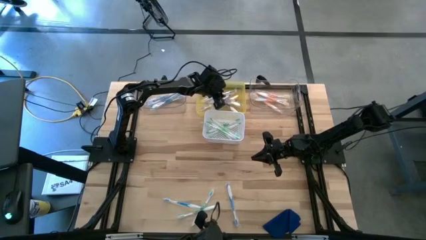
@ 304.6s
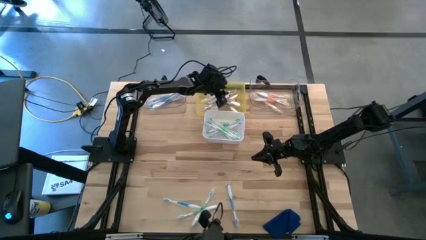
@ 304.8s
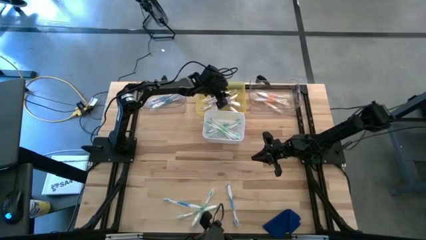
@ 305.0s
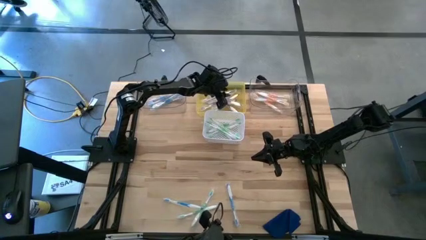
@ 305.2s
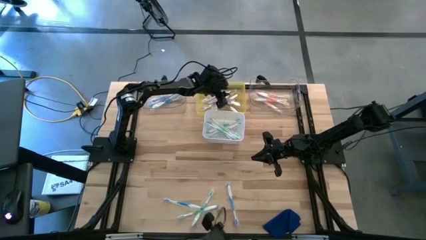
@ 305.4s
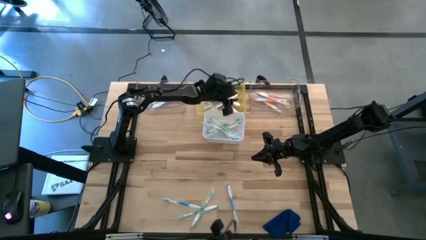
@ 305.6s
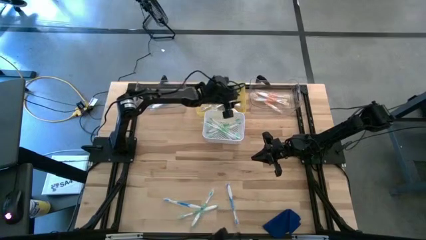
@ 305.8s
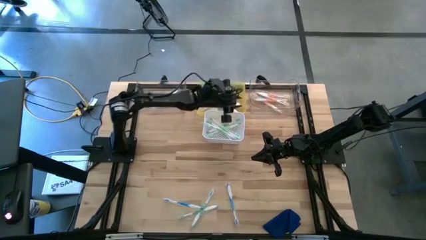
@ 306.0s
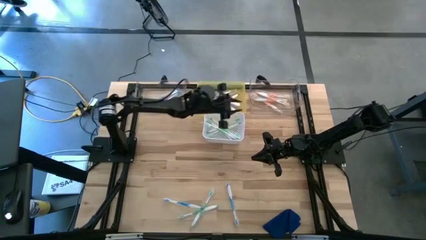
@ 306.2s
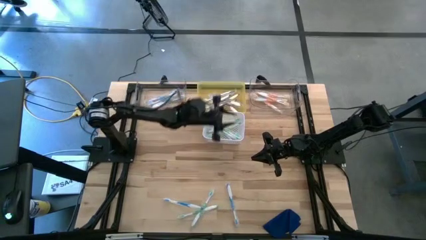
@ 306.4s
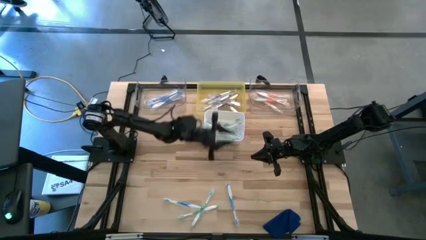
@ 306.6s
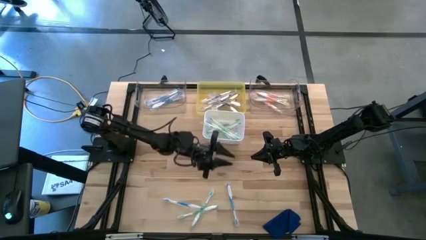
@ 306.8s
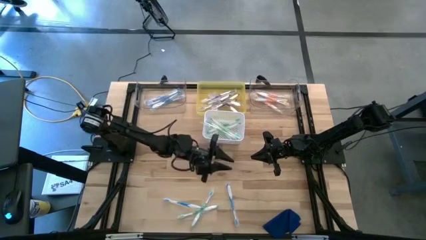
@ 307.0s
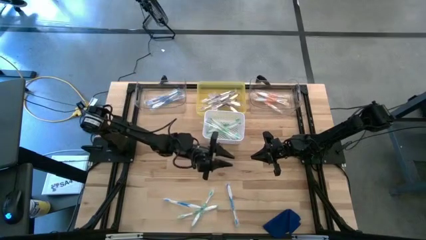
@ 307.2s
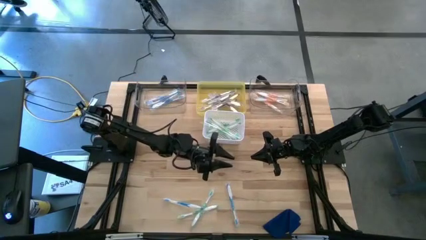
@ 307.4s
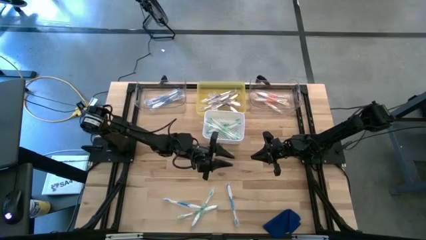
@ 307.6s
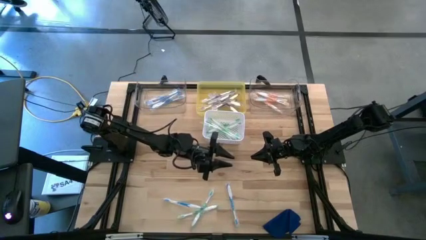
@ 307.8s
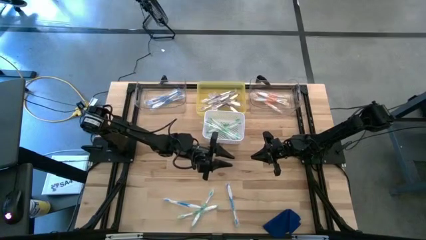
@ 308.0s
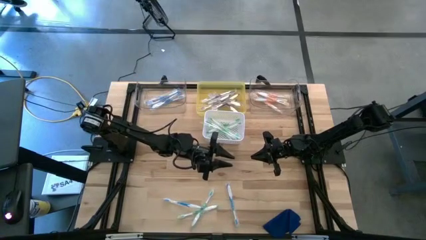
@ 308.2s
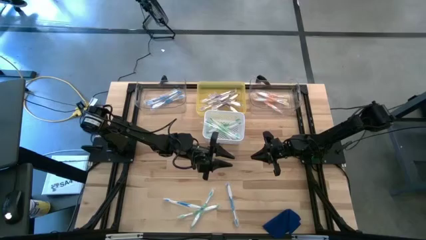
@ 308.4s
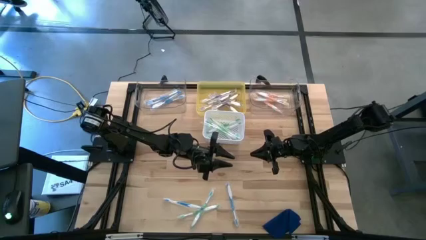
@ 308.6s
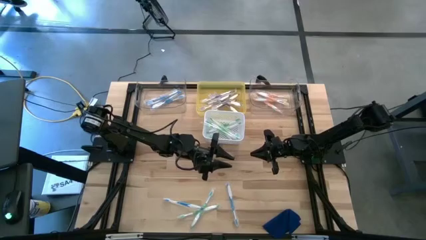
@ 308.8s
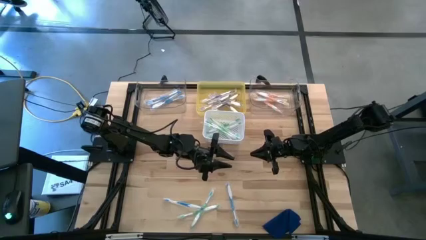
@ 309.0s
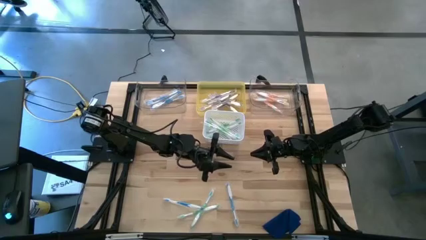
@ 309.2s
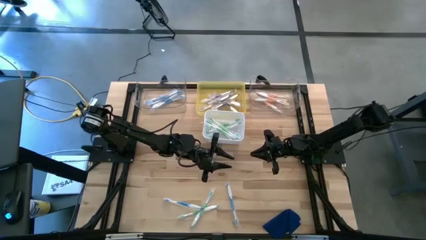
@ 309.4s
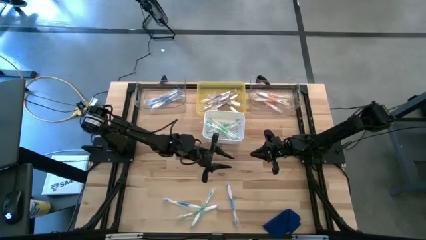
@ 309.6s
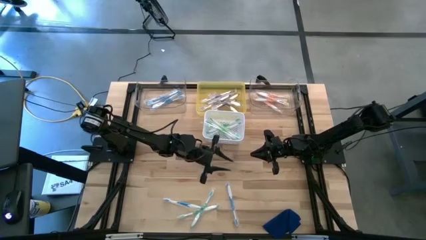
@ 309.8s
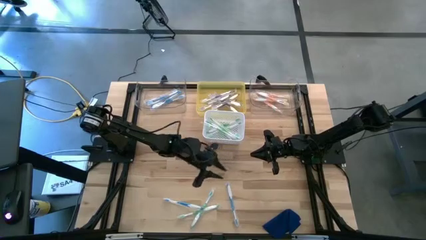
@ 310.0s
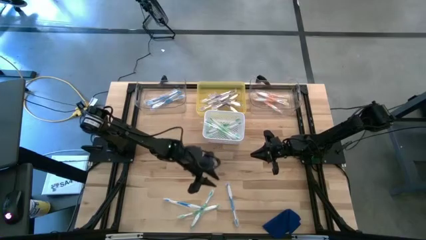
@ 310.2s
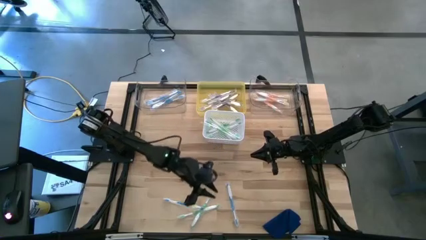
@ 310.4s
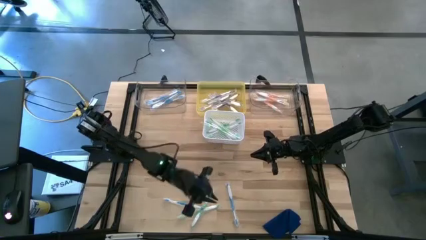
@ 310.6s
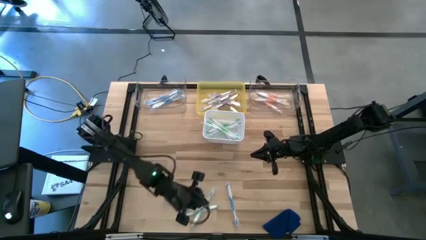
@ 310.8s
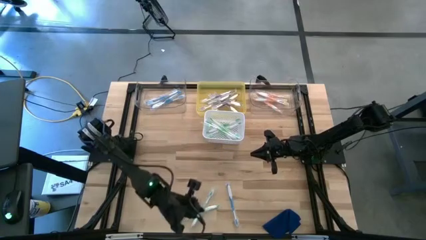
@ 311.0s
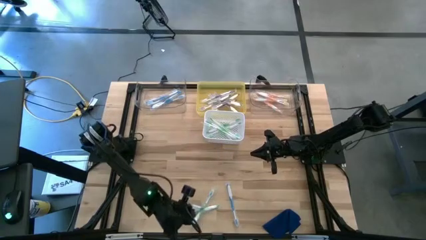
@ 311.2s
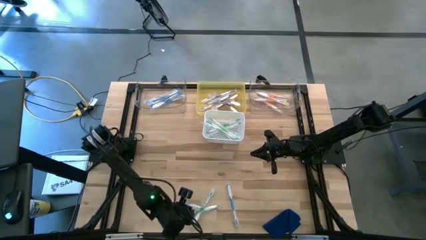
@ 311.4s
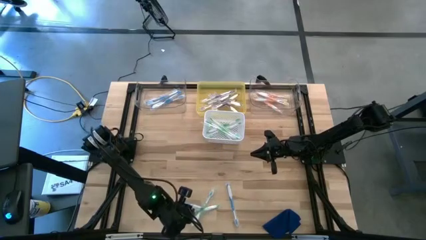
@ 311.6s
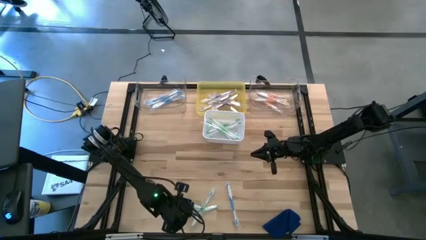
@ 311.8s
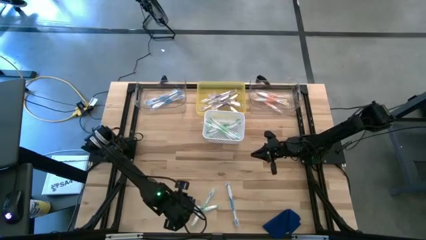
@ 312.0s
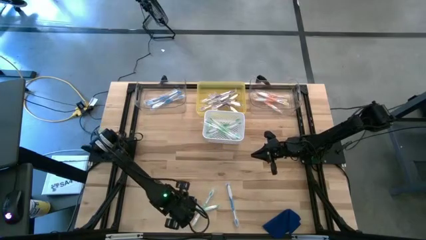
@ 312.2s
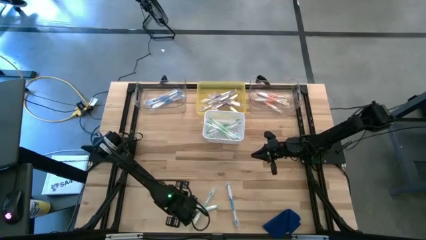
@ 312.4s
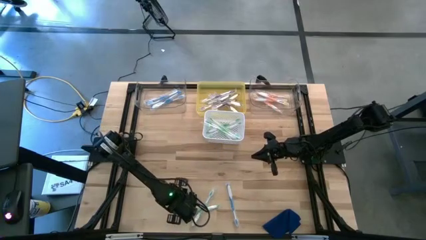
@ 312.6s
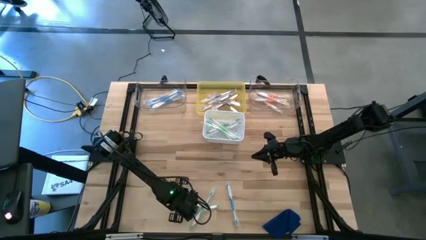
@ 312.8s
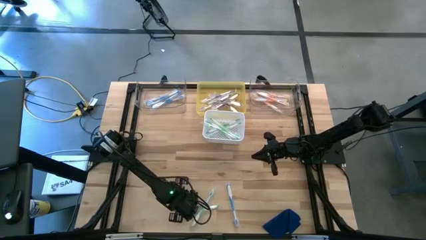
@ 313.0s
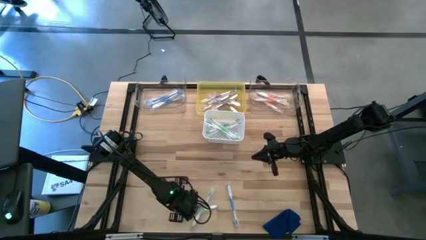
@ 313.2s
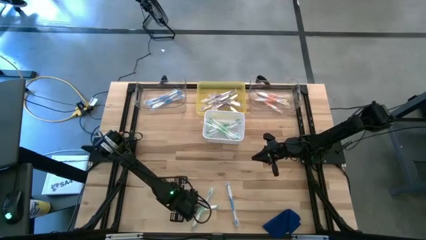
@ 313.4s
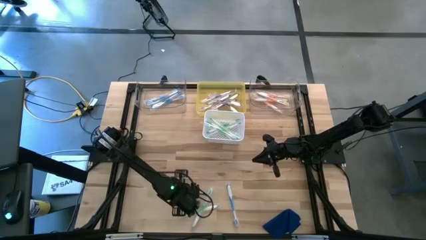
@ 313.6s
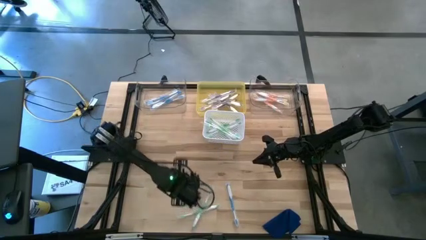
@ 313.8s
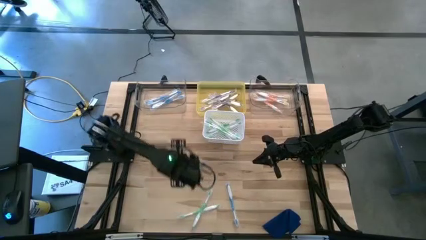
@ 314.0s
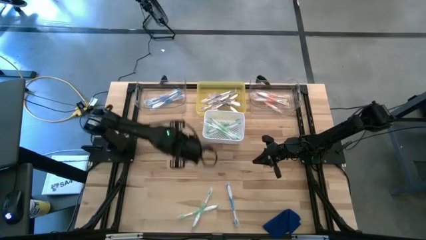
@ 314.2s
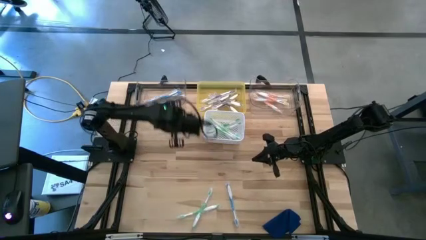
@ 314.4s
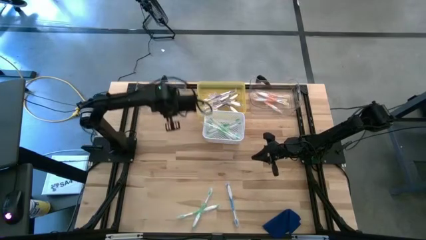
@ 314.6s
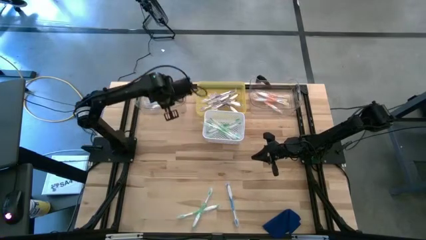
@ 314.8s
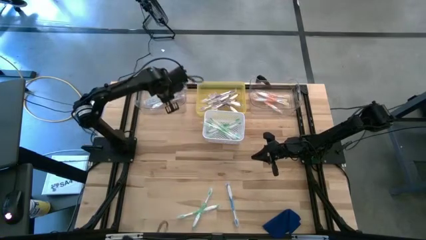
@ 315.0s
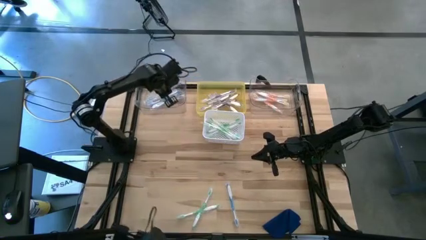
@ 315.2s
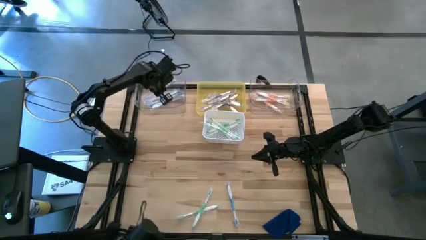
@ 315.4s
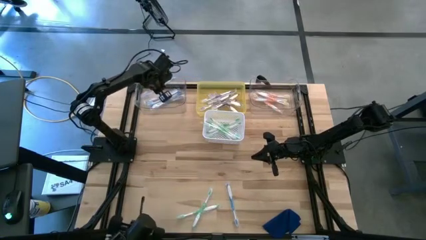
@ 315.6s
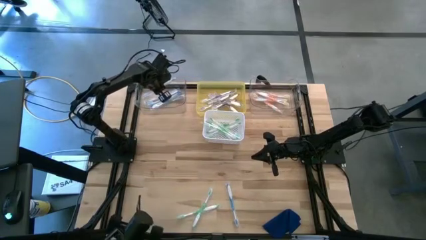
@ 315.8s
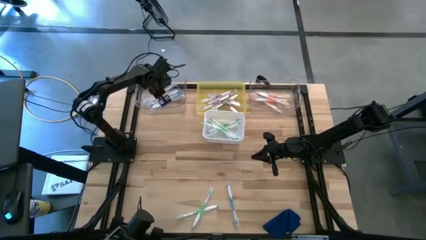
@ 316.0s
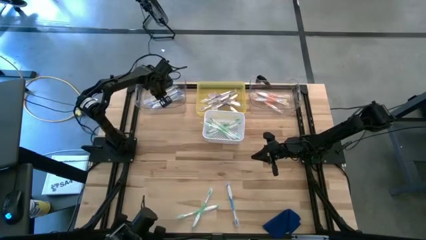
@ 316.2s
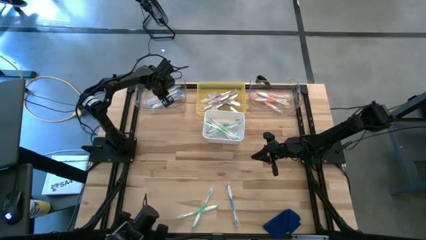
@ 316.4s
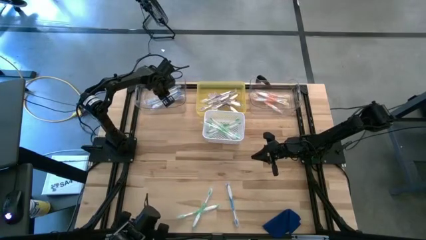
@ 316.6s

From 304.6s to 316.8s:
Task: Pick & Place Toothbrushes
Put the blue toothbrush into the left transparent bin

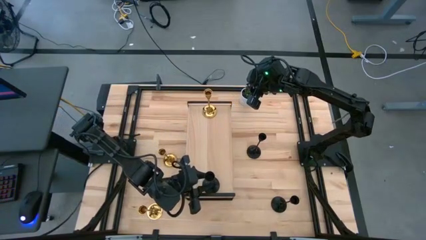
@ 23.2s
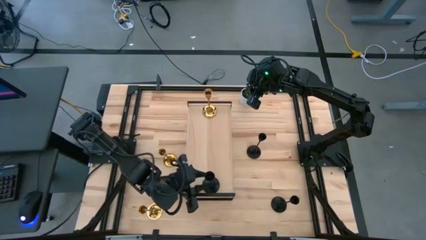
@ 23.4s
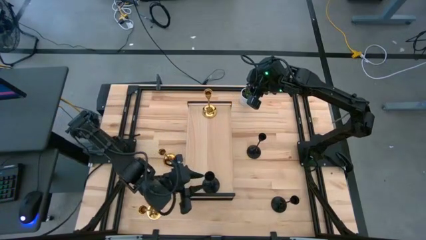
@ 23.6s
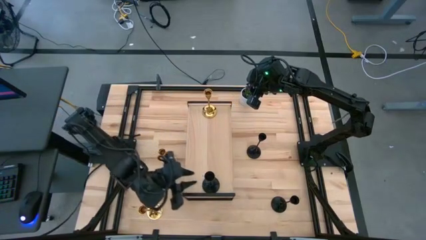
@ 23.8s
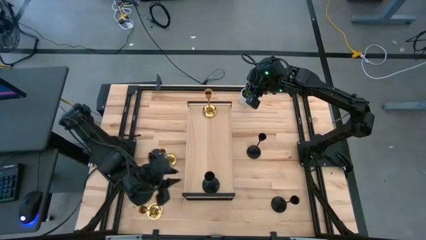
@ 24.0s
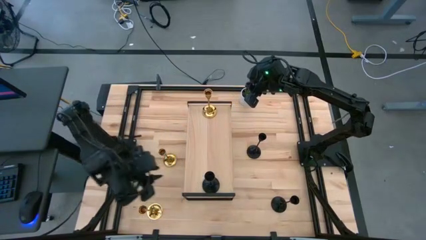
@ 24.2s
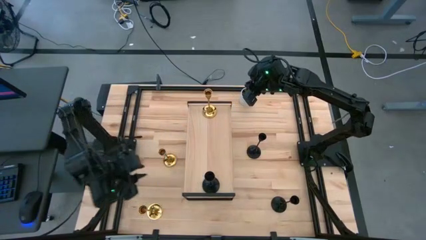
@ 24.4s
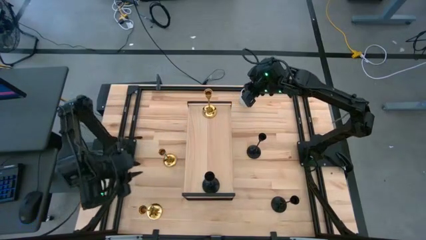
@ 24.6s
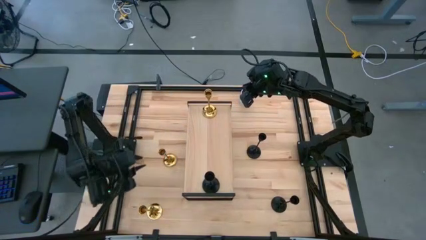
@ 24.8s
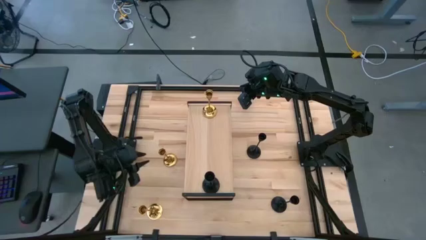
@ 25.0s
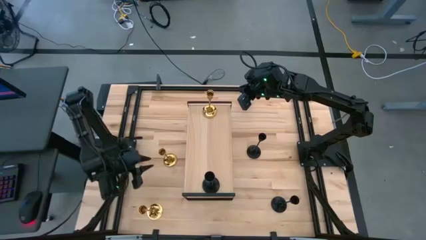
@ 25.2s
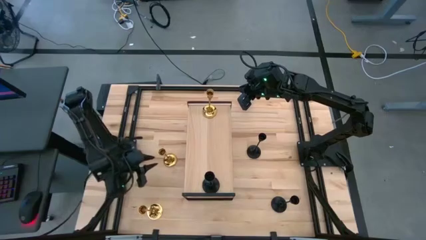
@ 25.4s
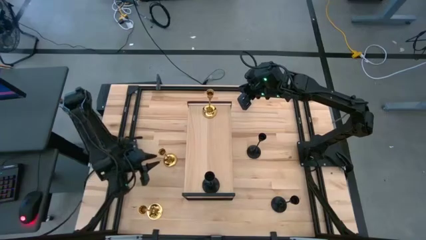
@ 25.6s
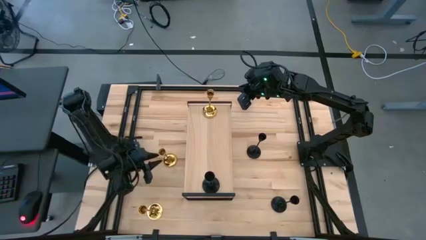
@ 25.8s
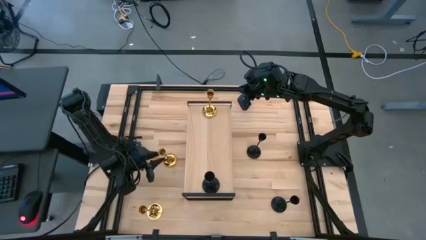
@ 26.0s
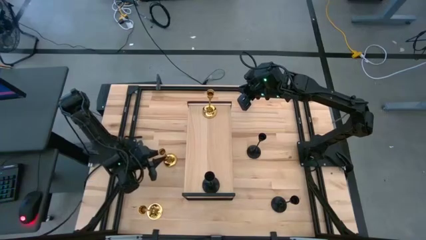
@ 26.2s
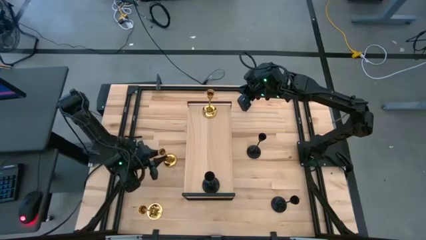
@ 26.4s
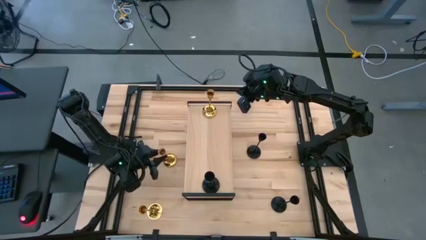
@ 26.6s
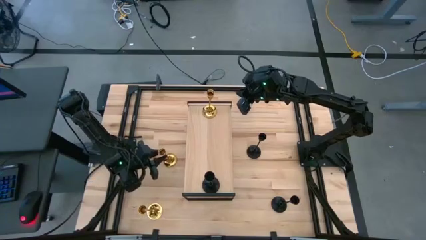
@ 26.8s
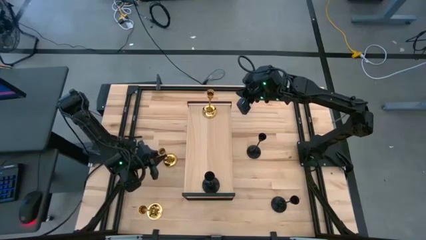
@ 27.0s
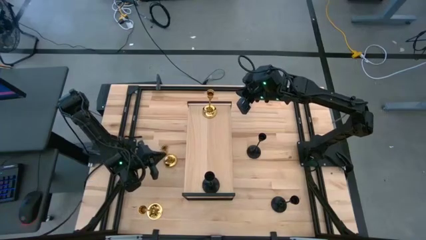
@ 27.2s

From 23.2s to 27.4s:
Task: Pick & Place candle stick holders
Put the top gold candle holder on the shelf aligned with the other gold candle holder
